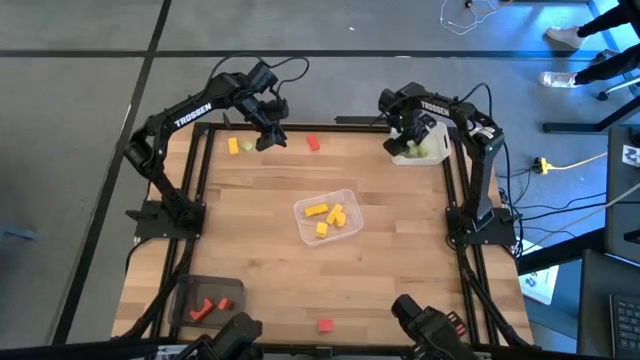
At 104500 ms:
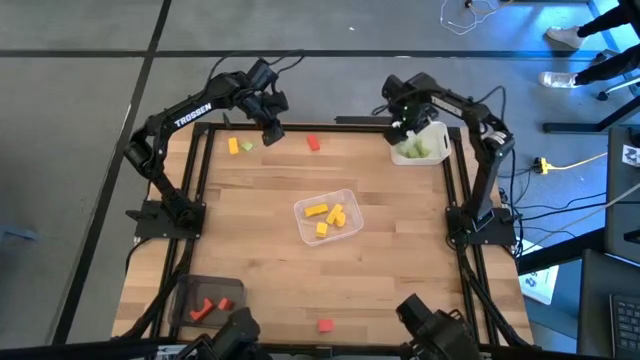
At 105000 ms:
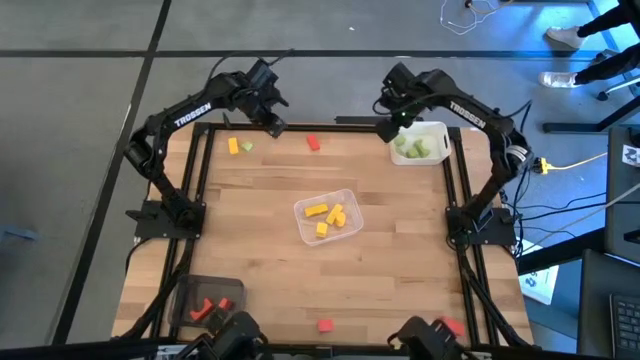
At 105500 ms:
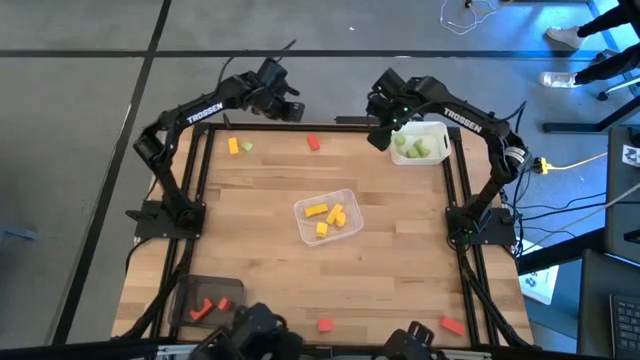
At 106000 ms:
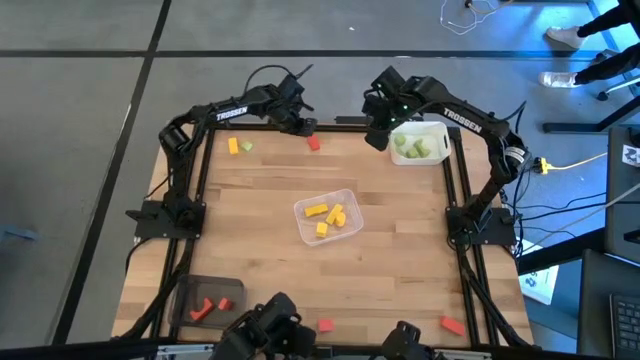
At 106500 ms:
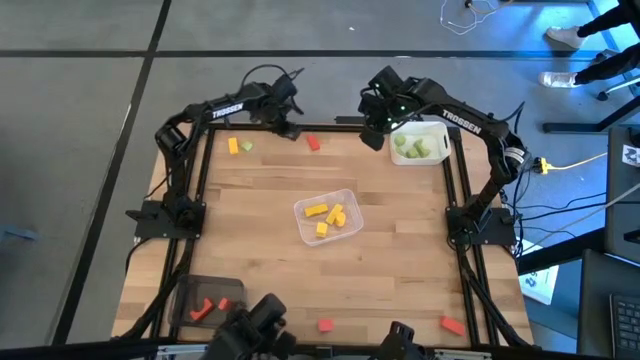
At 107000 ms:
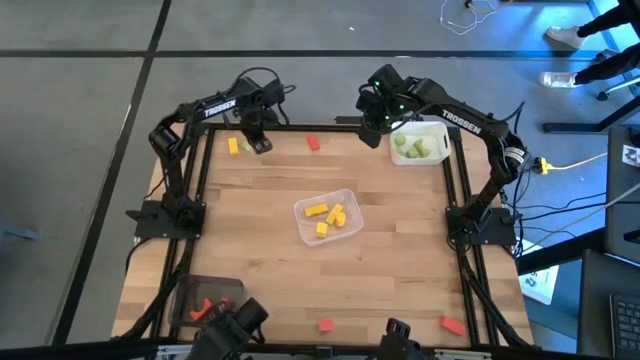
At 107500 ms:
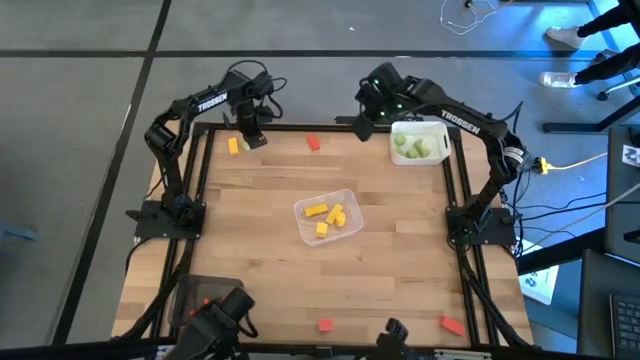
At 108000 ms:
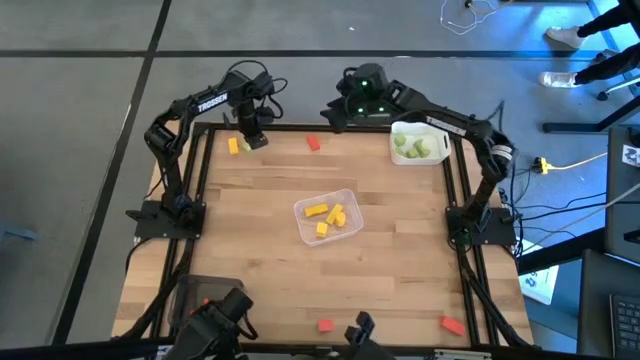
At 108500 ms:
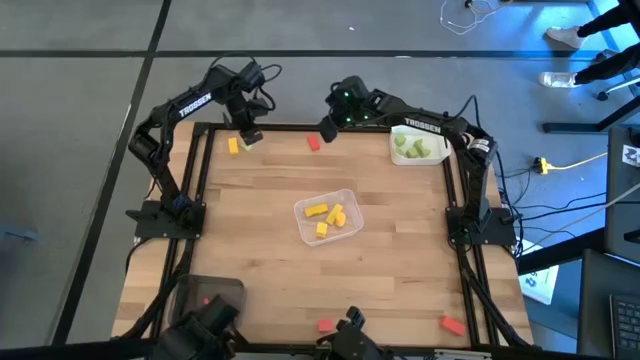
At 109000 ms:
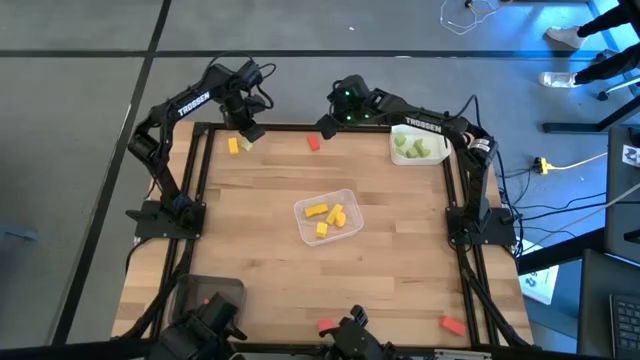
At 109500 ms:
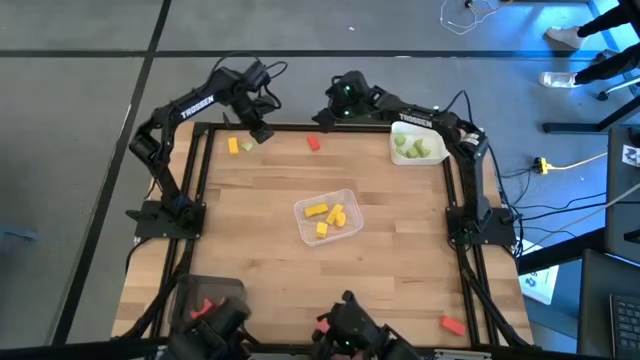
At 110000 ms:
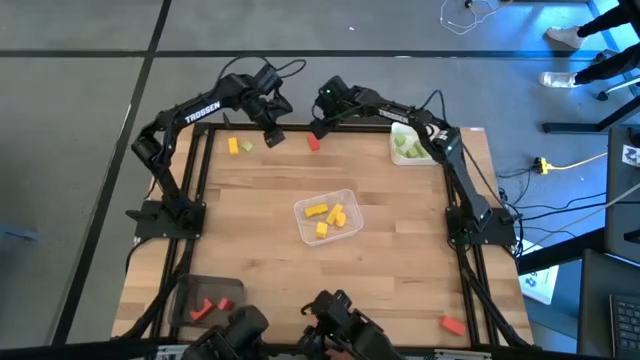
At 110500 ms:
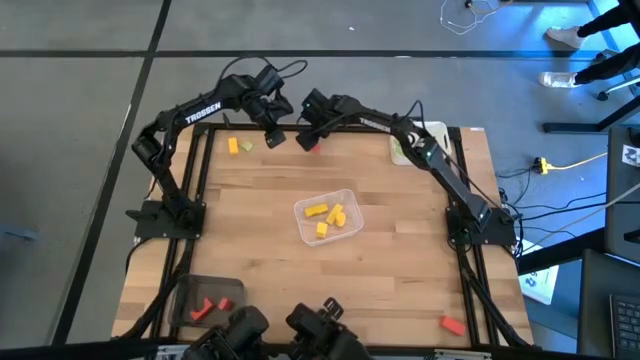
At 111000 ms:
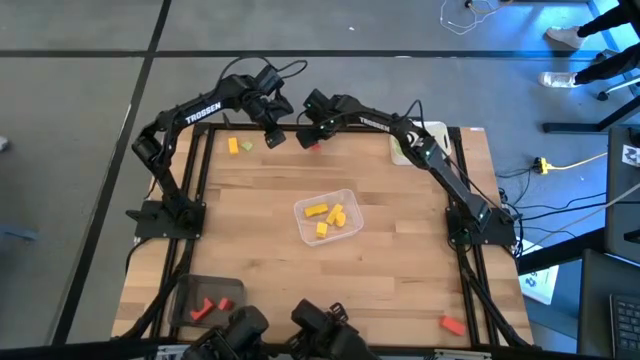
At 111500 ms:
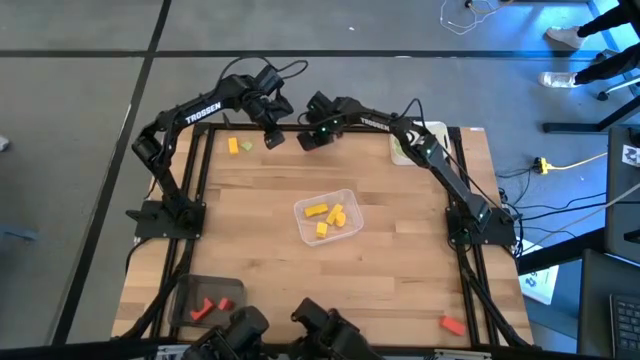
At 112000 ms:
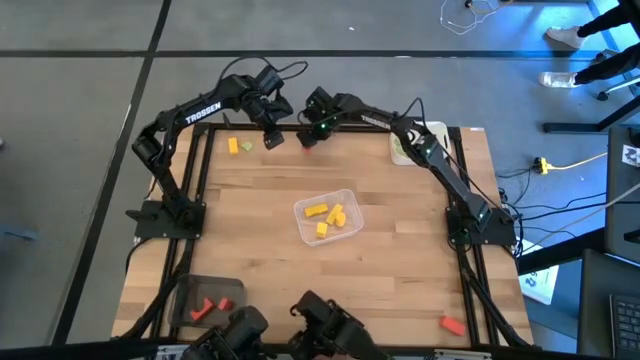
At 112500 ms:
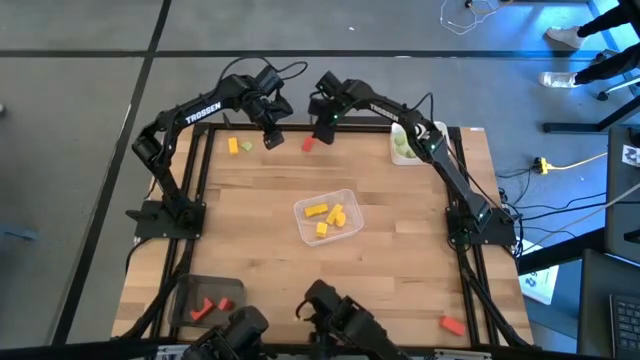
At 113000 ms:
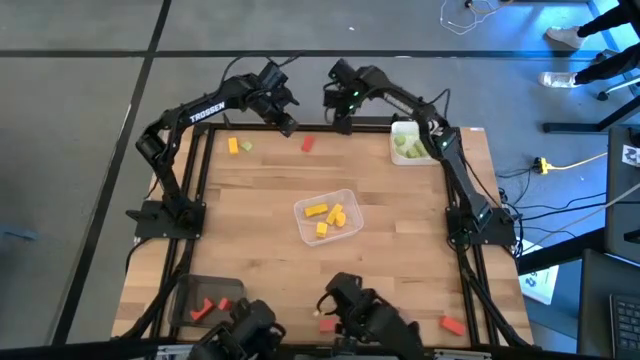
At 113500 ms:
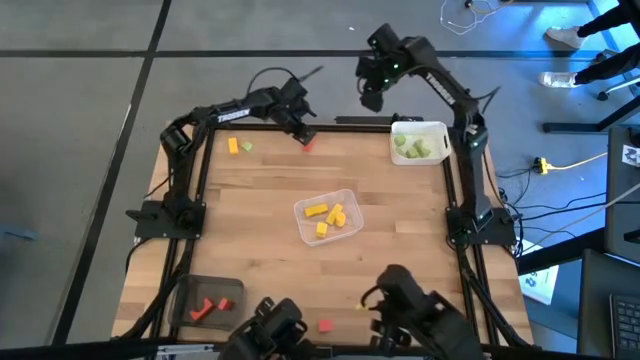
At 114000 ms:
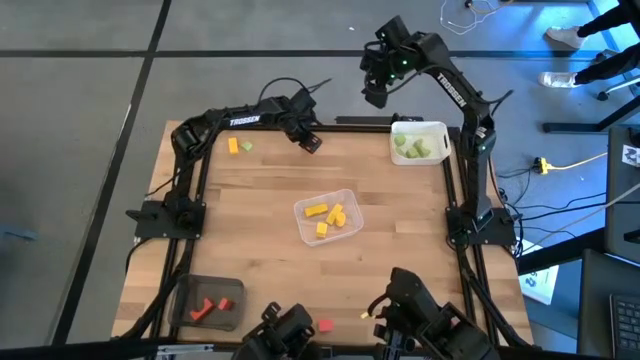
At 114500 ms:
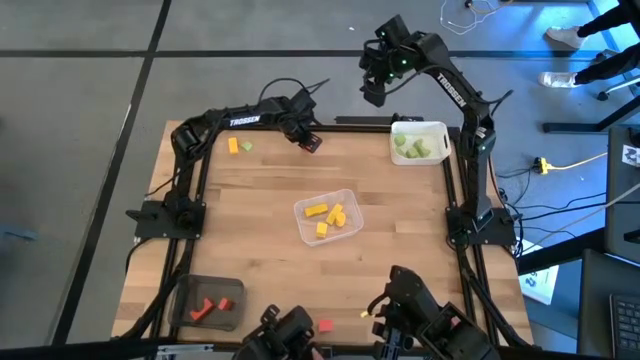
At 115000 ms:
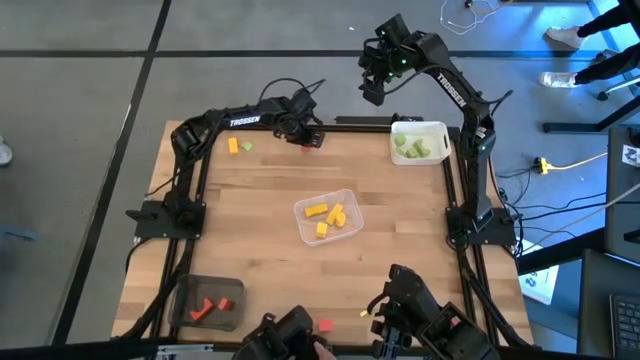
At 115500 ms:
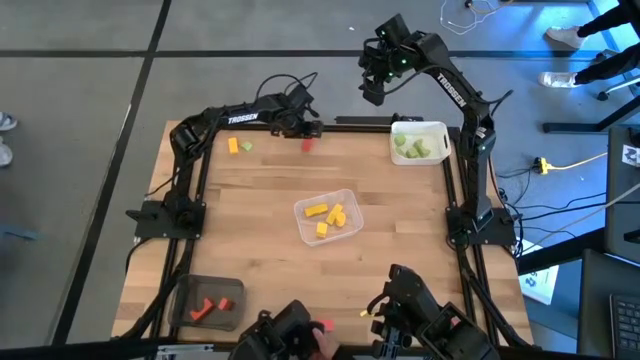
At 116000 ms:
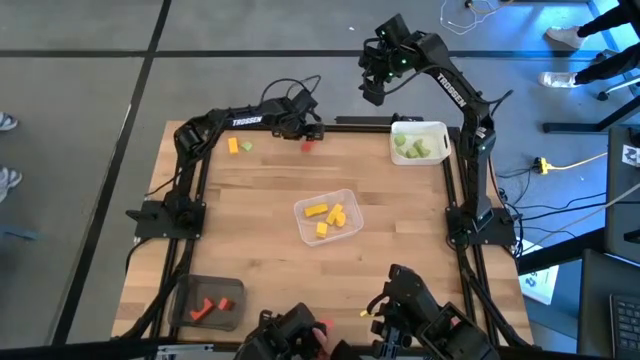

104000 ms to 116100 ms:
Task: Sort & place blocks by color
Put the orange block into the black bin

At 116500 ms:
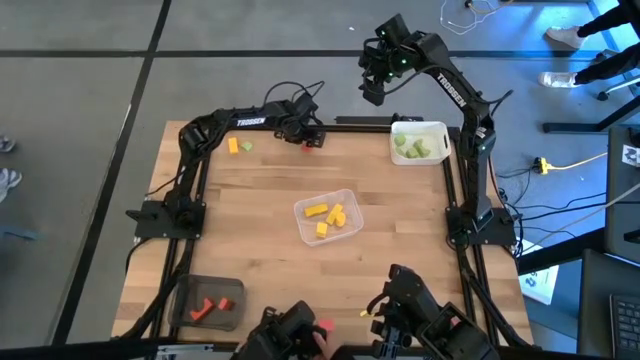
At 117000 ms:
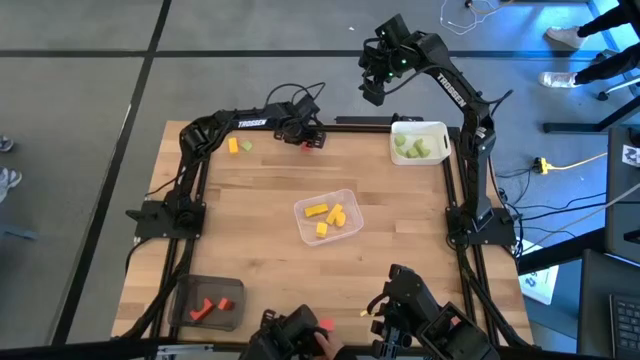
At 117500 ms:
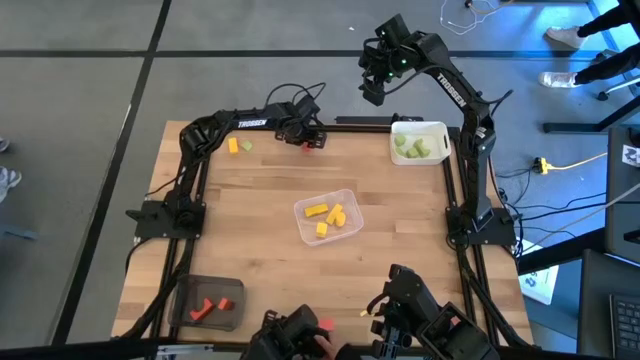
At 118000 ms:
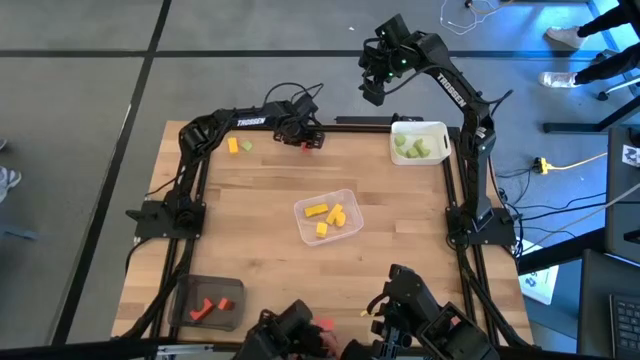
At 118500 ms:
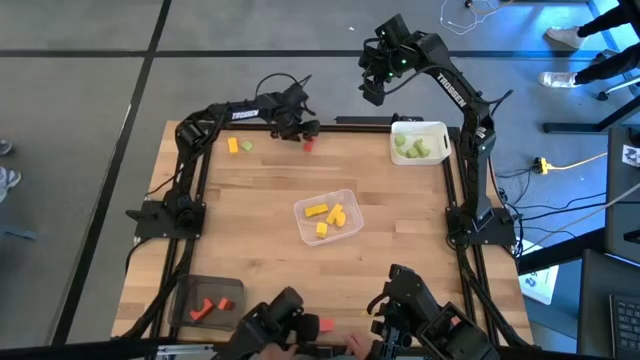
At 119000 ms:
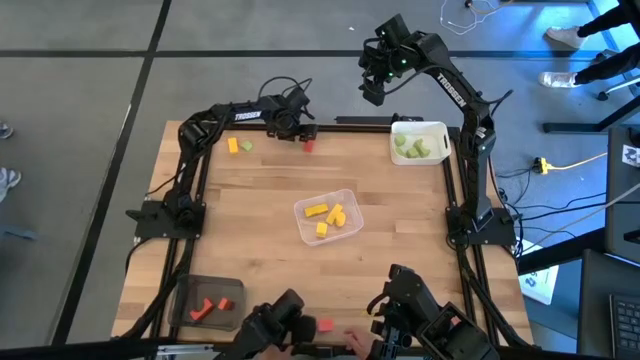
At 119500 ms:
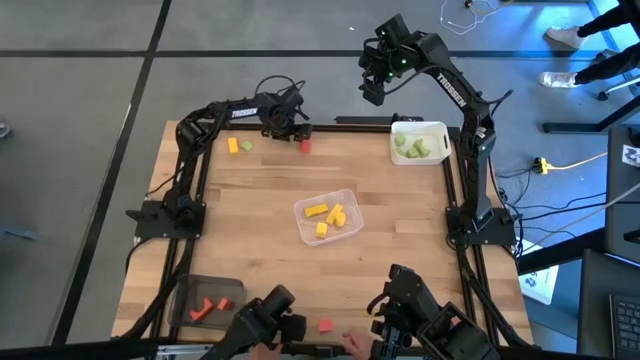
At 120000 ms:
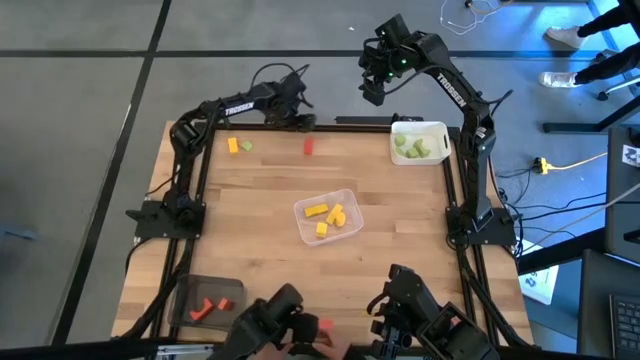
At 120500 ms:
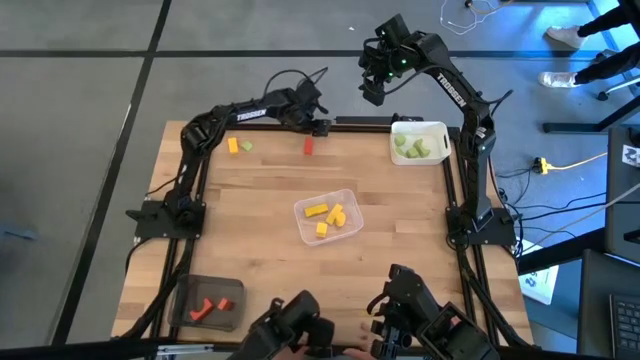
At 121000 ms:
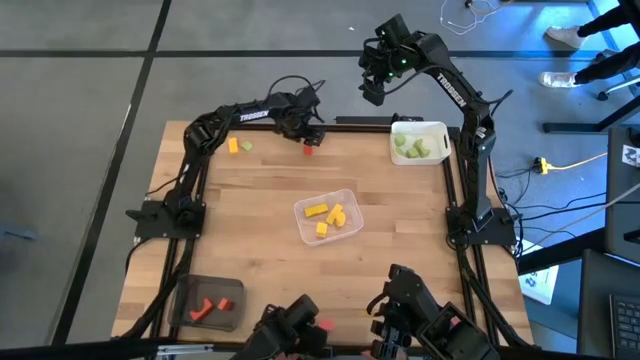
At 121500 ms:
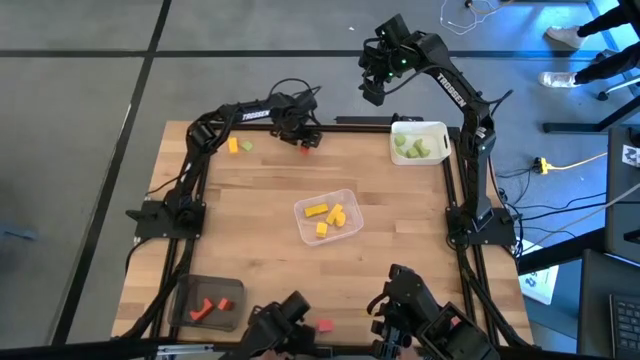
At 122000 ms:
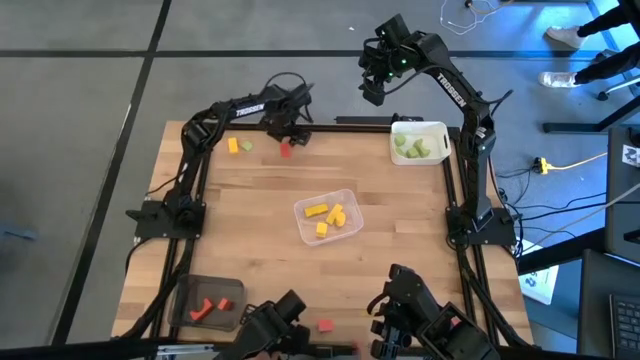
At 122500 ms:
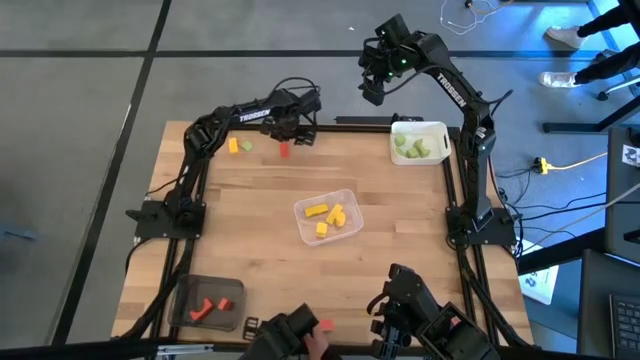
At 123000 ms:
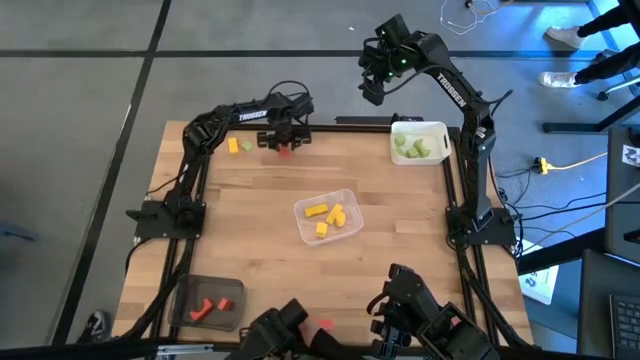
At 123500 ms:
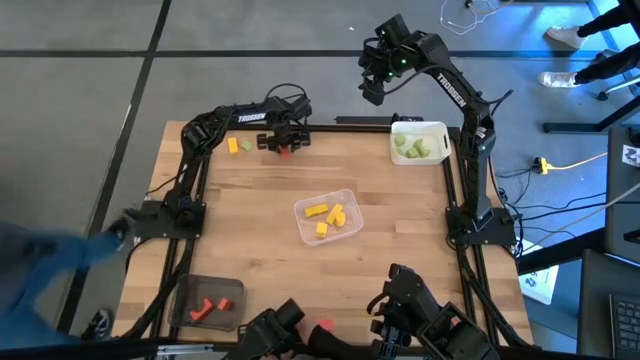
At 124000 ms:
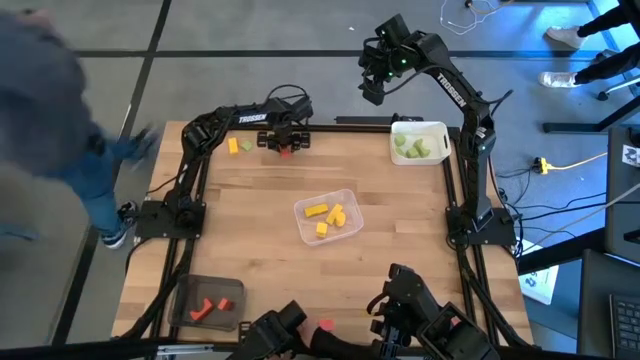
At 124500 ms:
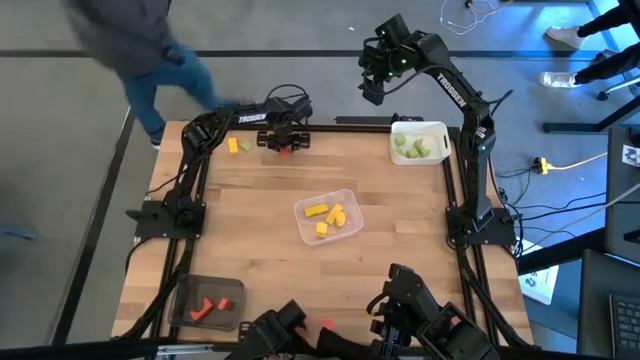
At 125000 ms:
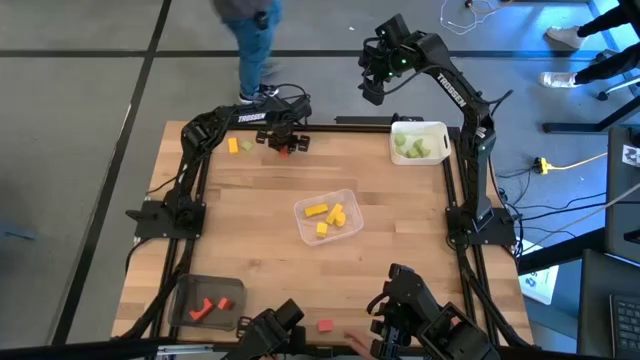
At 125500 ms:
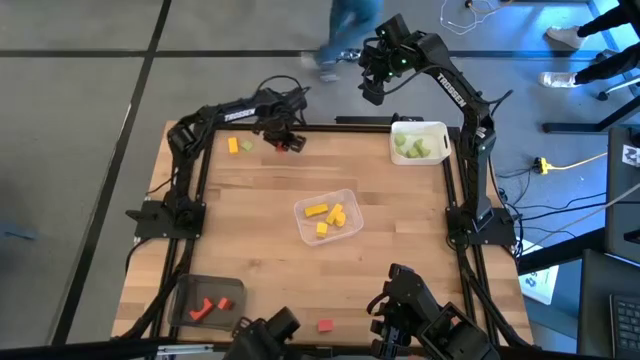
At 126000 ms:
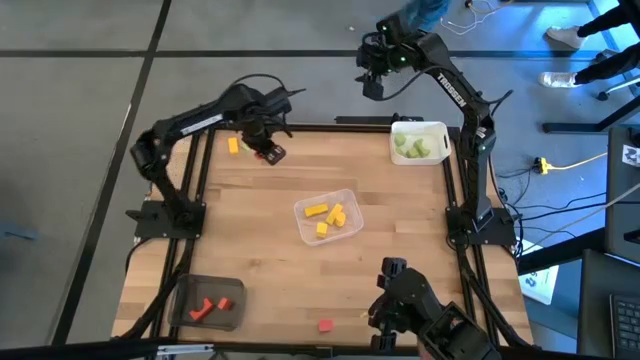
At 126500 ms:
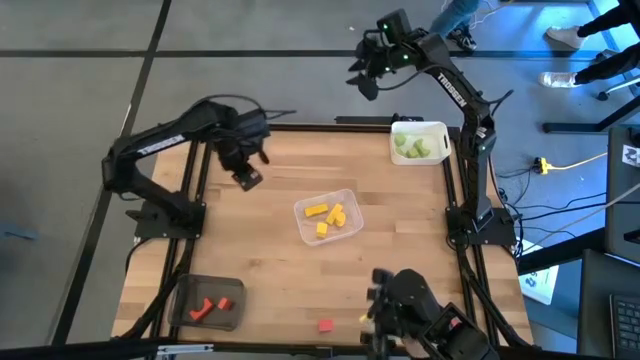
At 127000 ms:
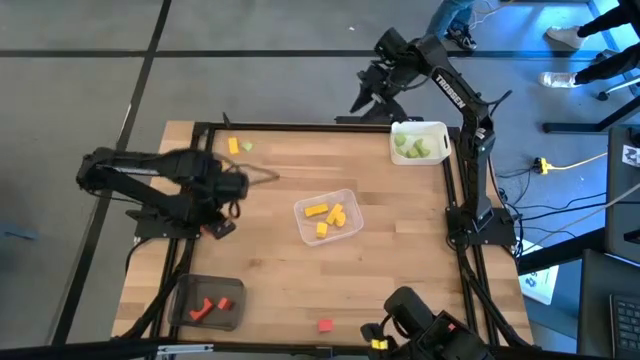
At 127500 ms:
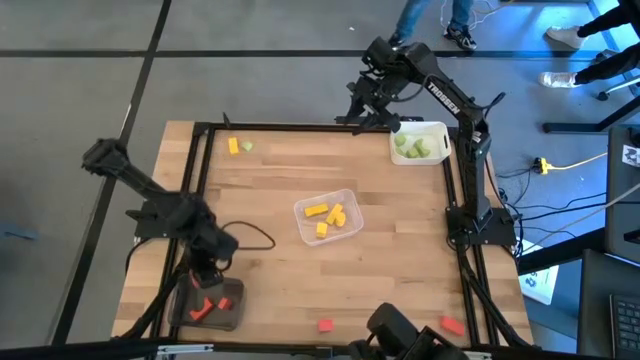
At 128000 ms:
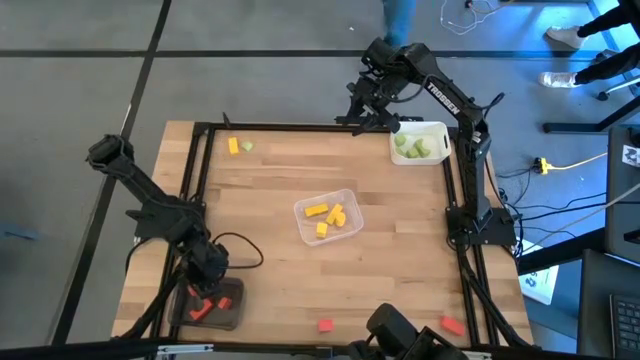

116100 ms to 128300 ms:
Put the orange block into the black bin
